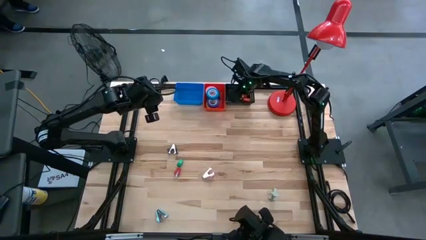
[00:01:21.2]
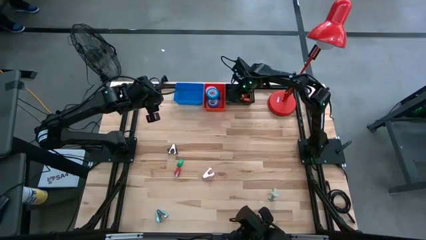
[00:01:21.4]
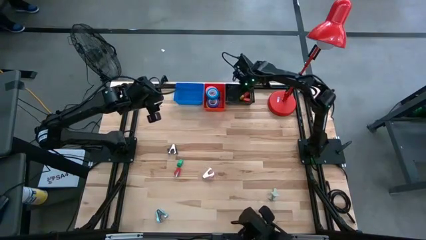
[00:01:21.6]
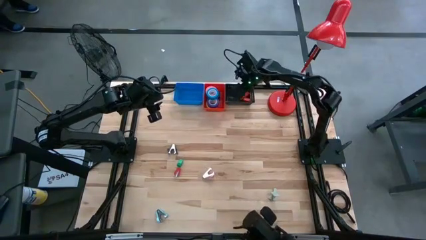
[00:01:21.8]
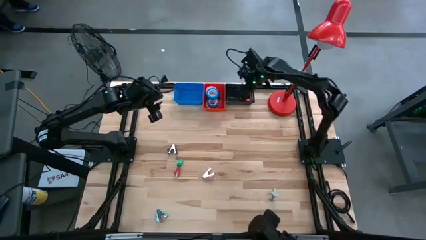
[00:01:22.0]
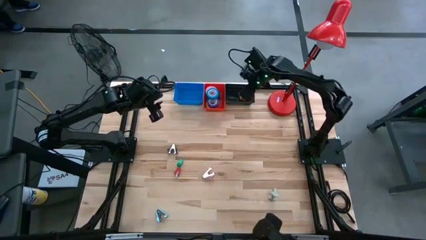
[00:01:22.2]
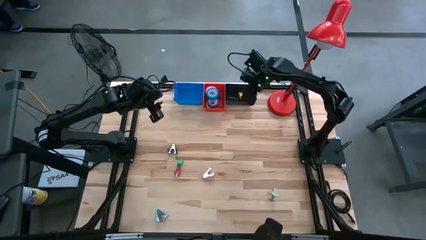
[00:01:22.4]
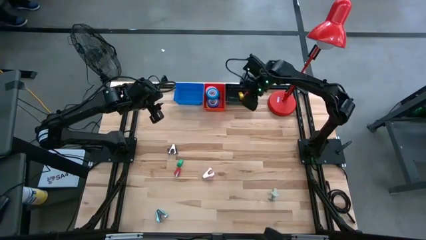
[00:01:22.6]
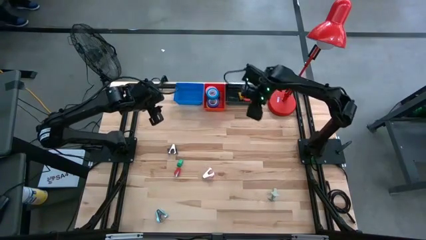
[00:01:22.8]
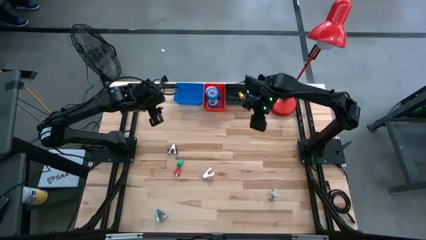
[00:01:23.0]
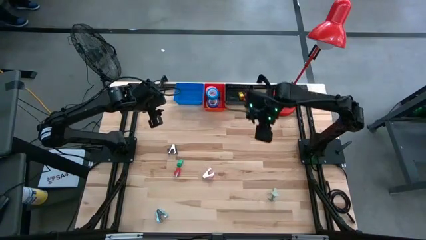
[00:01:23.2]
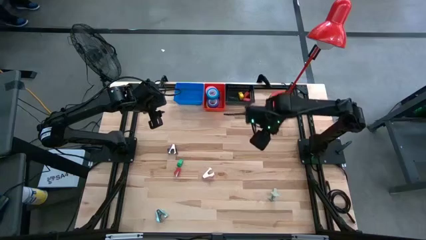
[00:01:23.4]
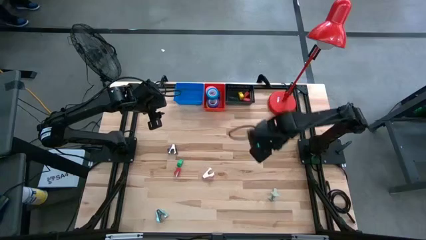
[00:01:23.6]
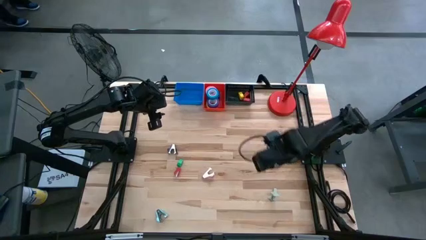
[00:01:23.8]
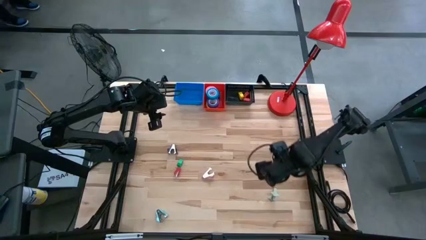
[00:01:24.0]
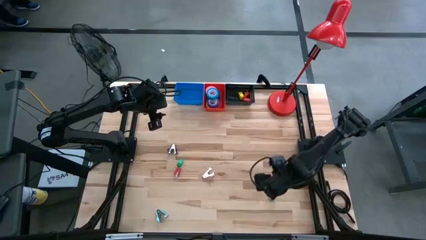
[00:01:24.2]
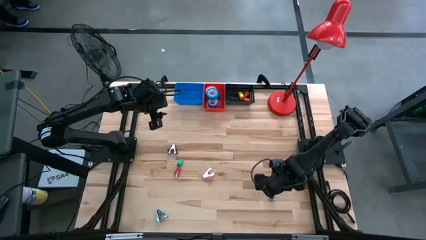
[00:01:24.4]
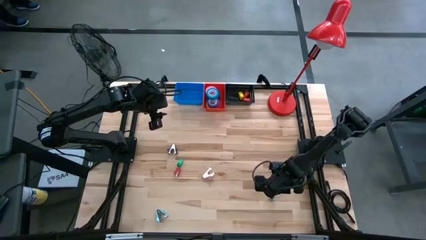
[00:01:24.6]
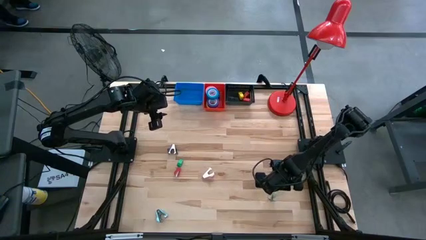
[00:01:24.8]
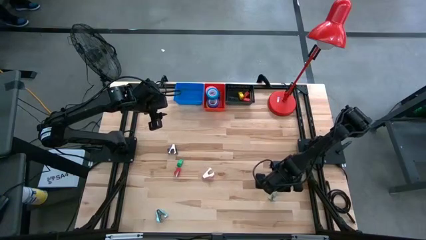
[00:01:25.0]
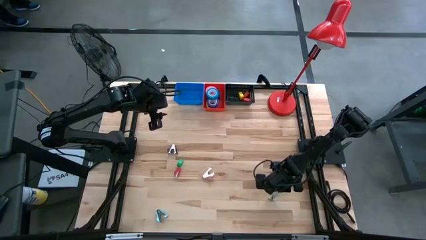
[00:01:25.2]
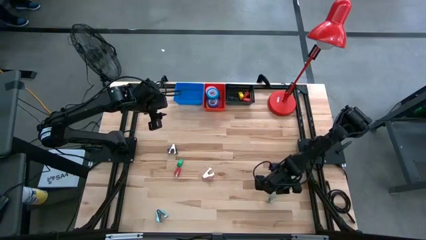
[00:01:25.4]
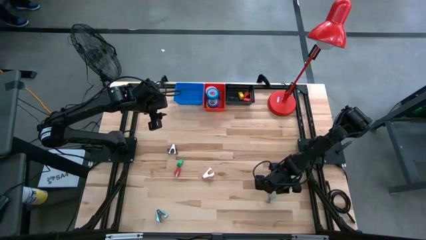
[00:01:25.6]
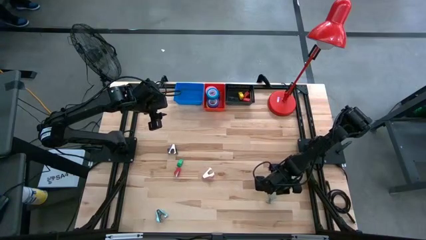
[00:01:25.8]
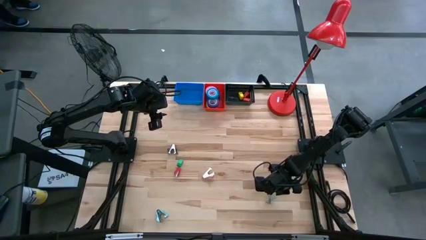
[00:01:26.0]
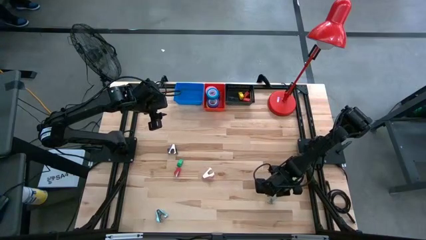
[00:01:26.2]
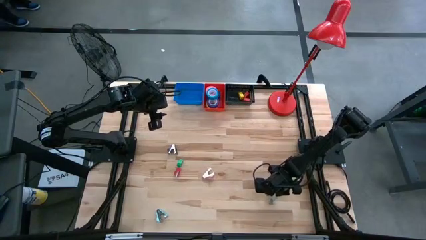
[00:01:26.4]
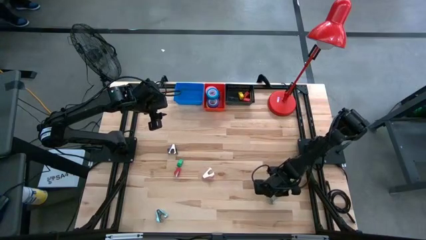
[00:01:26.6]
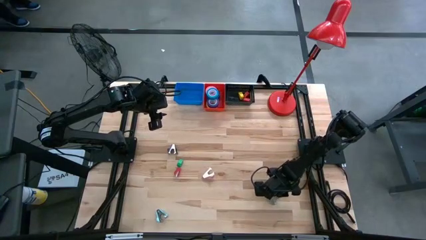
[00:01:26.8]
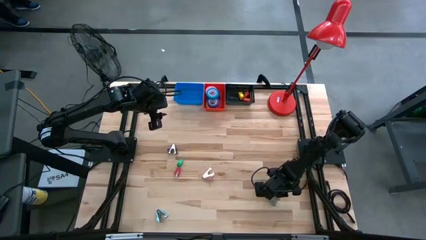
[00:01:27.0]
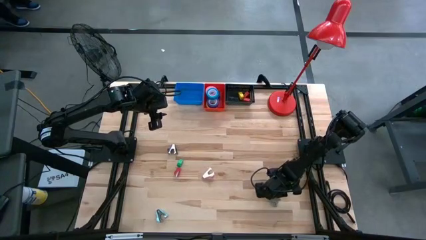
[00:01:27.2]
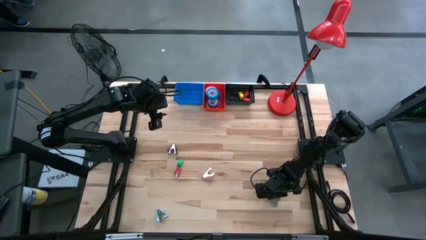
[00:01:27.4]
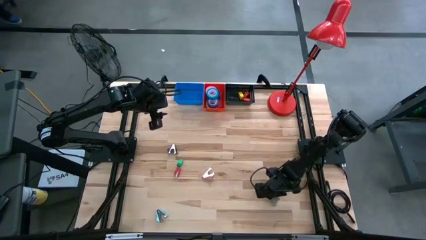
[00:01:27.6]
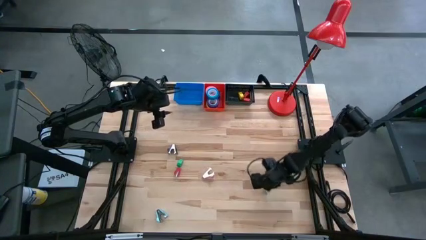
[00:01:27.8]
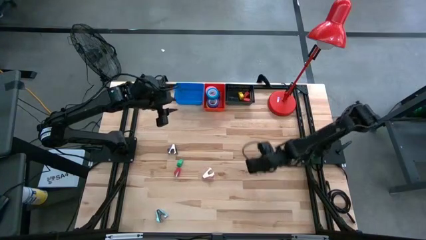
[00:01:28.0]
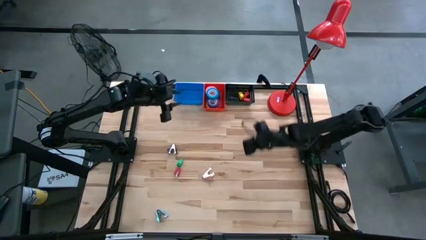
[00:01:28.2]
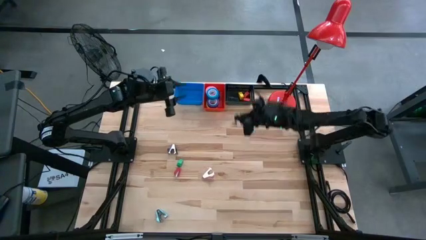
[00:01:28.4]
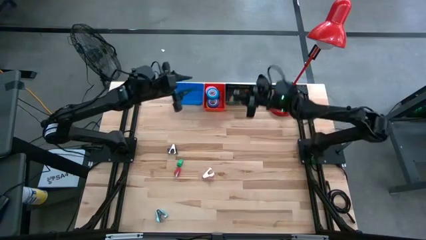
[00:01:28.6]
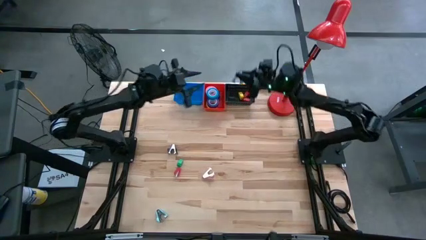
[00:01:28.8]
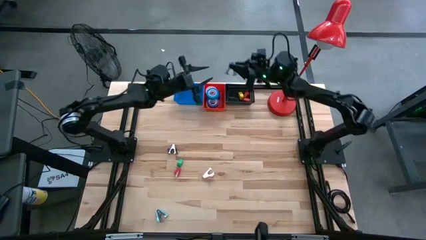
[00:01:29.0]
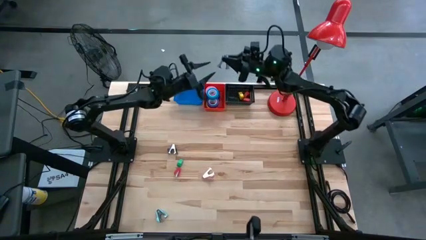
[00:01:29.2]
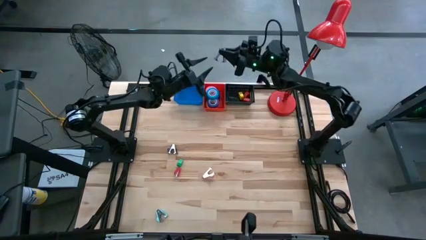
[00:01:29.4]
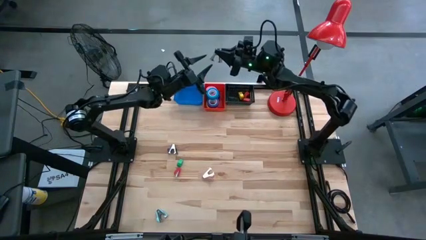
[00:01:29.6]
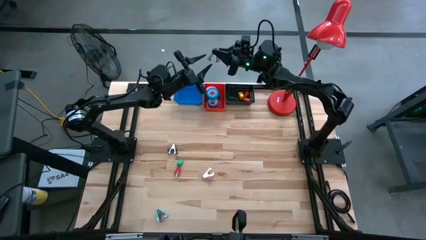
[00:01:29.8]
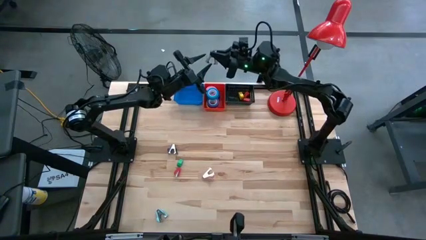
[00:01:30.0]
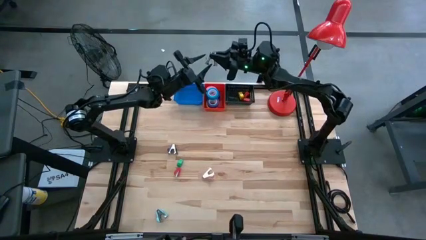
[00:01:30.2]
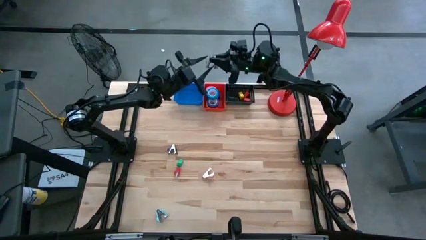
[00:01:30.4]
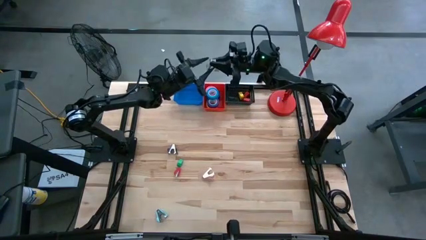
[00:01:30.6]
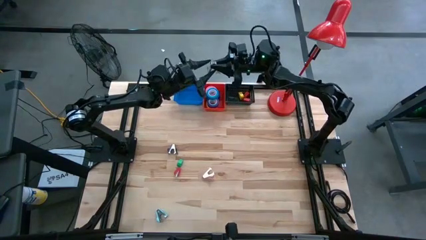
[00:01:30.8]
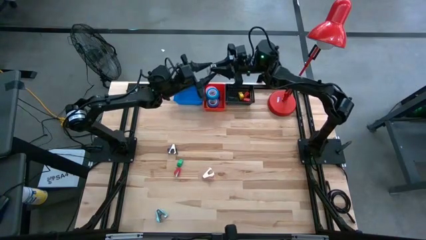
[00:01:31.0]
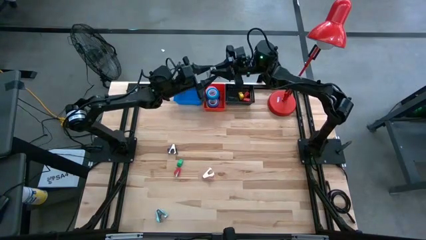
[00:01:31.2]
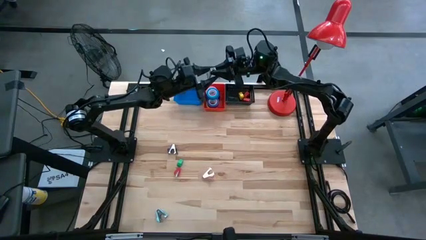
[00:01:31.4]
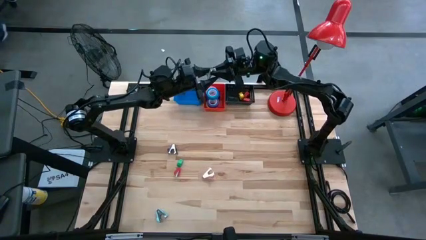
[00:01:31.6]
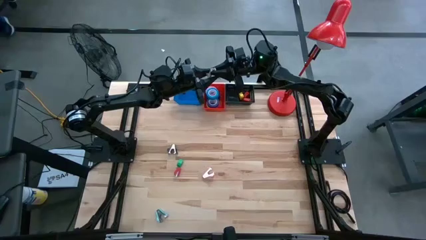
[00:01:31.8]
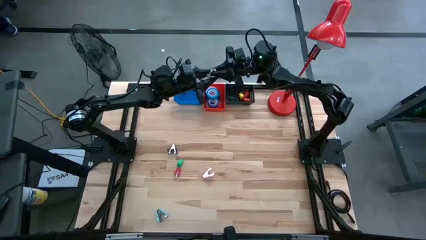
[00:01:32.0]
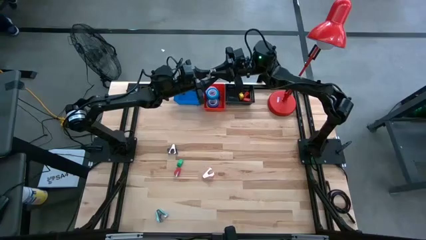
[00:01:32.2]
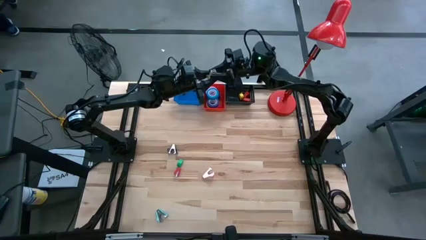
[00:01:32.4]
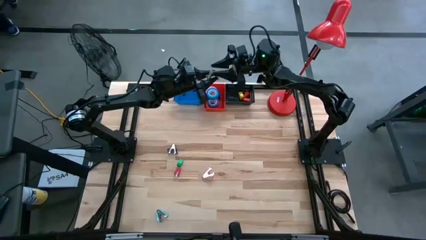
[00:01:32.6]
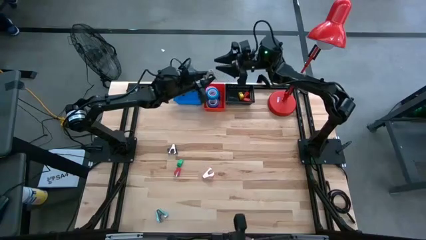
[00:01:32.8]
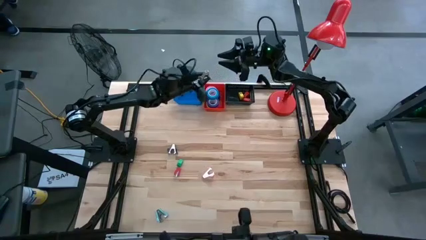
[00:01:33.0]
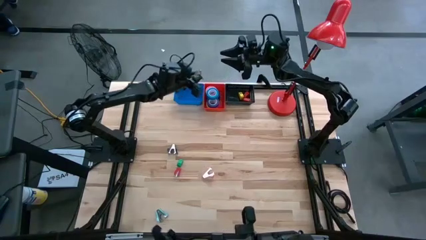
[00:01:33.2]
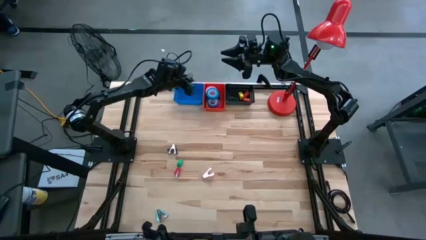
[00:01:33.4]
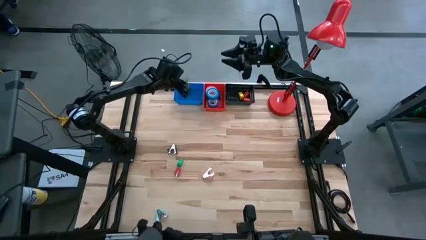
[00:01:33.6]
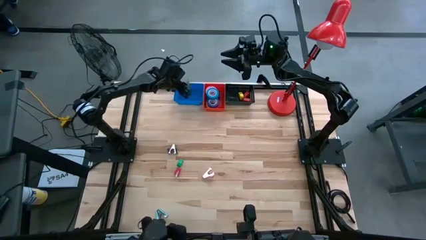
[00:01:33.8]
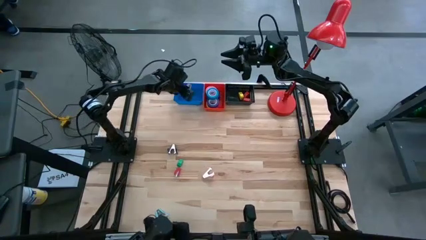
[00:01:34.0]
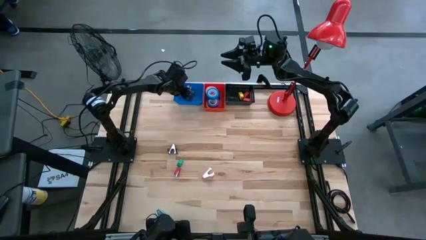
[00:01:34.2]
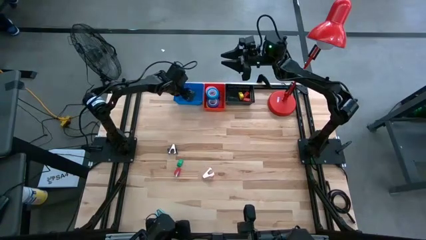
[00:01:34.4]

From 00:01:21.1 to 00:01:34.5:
Task: Pick and place Stapler, Stapler remover, tape
Put the gray staple remover into the blue basket

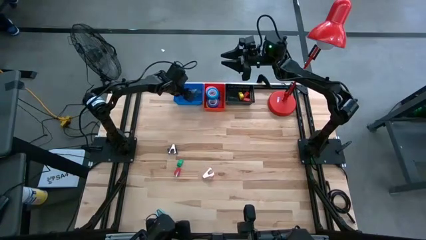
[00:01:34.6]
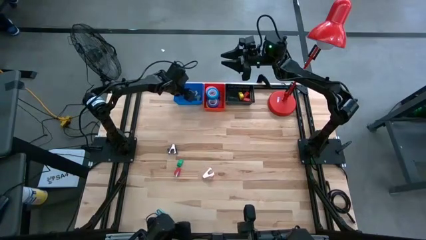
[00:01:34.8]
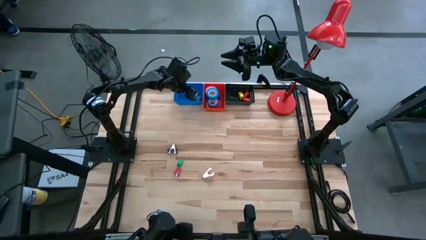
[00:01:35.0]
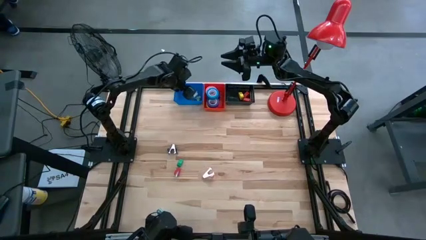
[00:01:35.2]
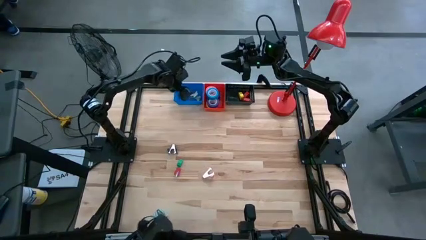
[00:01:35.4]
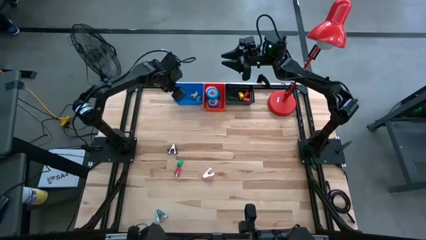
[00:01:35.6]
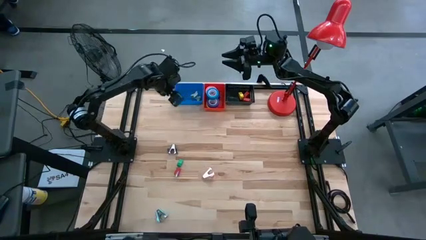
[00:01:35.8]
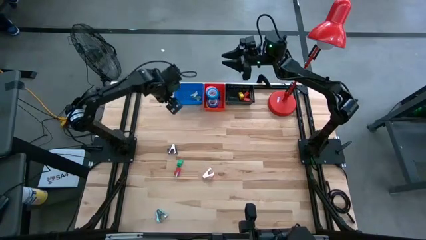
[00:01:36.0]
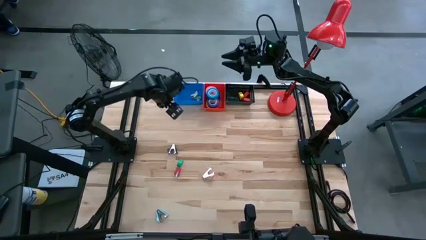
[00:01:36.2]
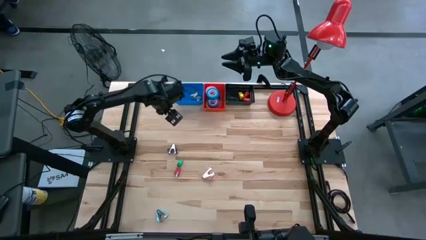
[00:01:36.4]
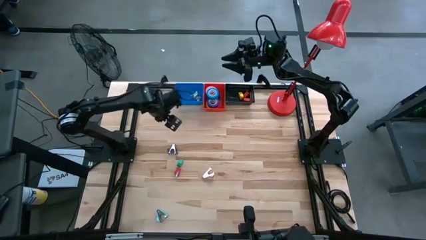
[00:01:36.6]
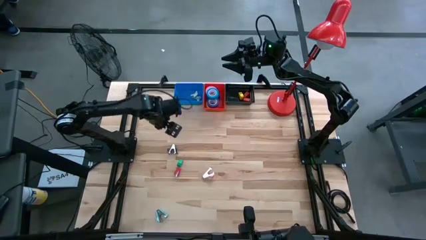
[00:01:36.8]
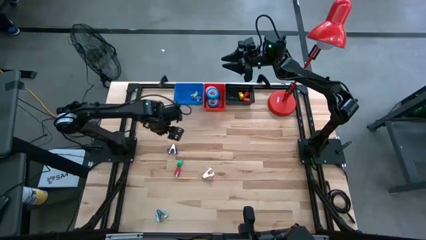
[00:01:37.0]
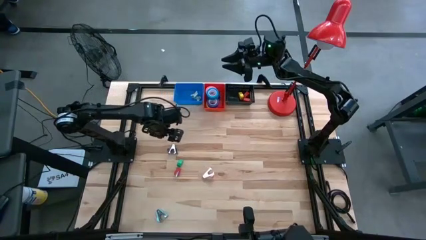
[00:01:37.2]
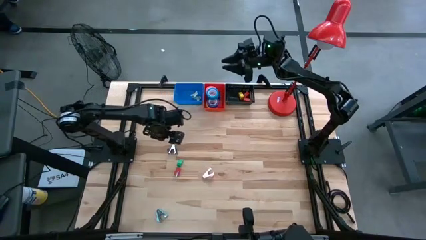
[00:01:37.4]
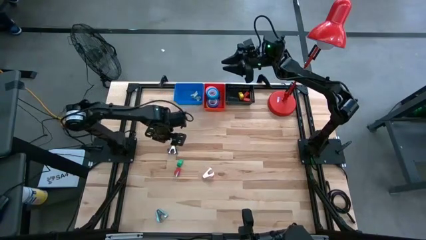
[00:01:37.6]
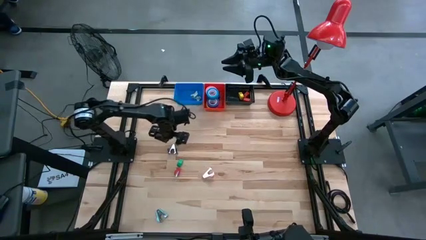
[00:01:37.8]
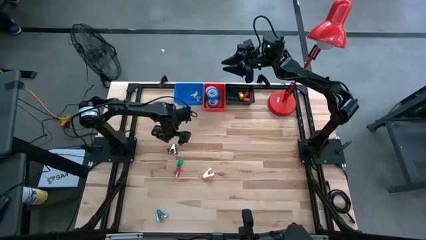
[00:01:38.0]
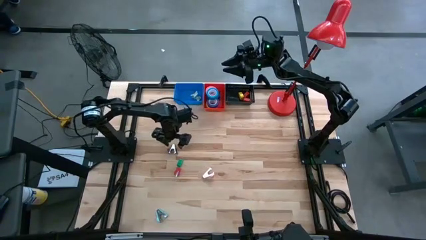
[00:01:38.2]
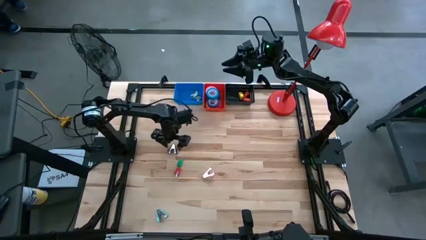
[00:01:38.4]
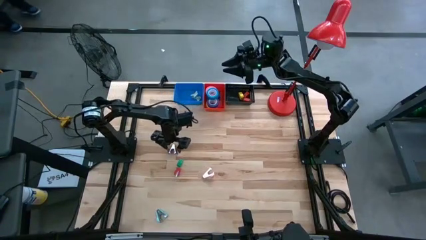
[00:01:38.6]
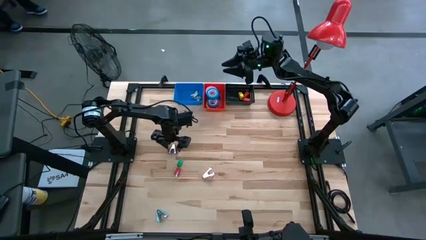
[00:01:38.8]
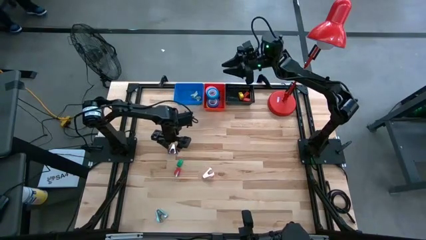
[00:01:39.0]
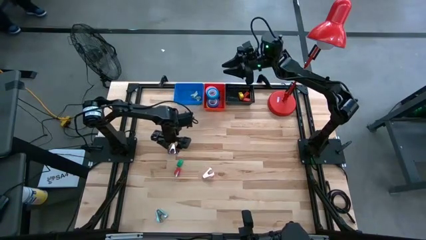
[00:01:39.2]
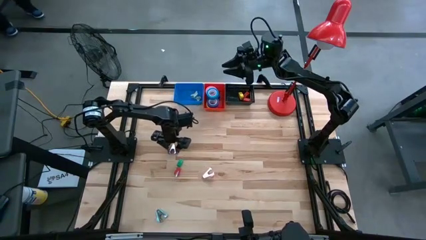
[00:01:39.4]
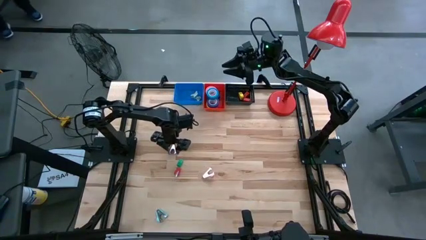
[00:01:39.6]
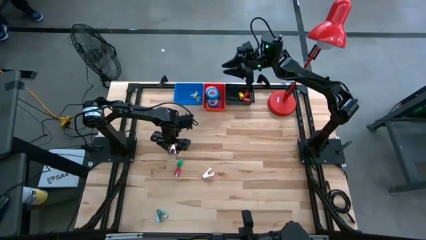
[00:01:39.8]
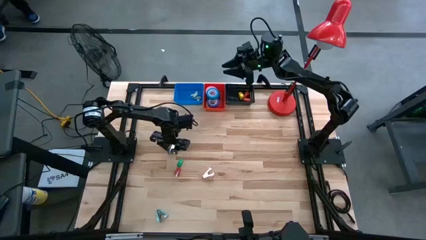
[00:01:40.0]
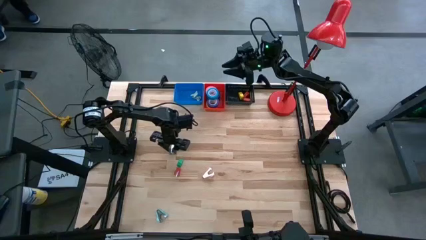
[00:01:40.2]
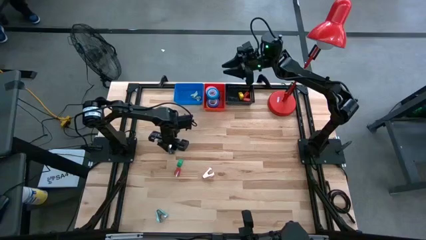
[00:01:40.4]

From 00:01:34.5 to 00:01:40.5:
Put the black staple remover into the blue basket
